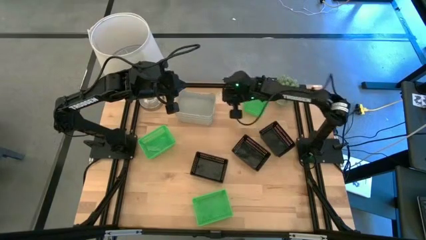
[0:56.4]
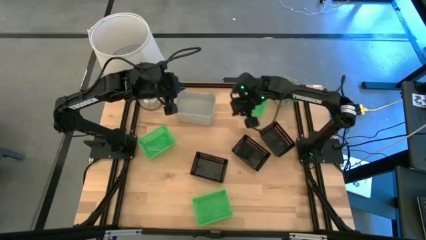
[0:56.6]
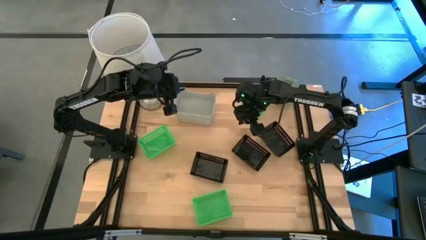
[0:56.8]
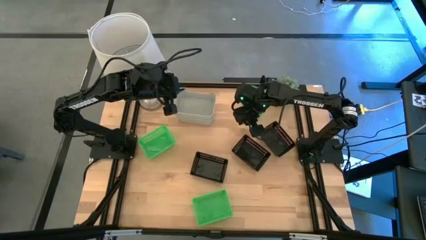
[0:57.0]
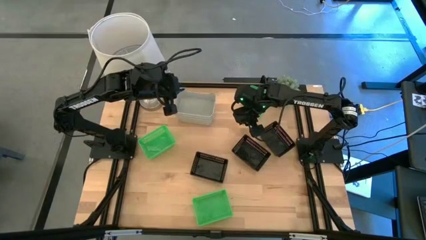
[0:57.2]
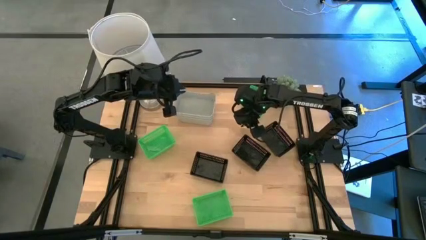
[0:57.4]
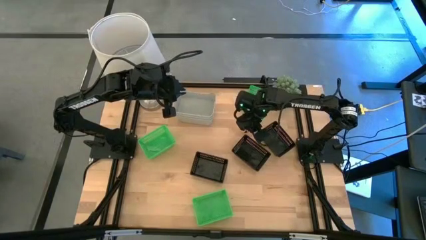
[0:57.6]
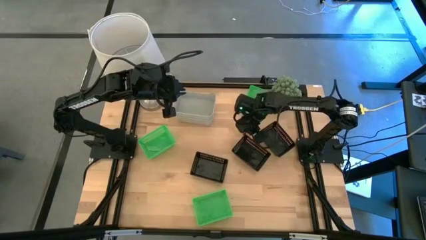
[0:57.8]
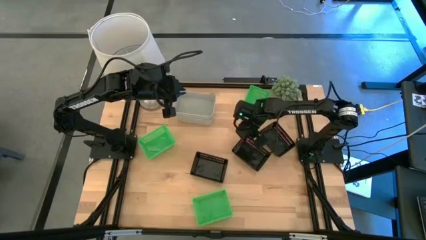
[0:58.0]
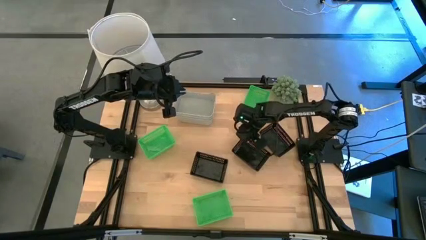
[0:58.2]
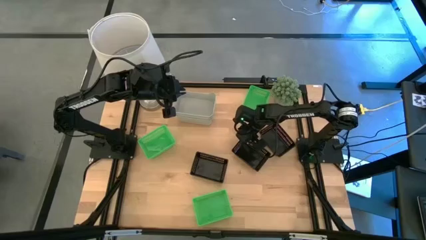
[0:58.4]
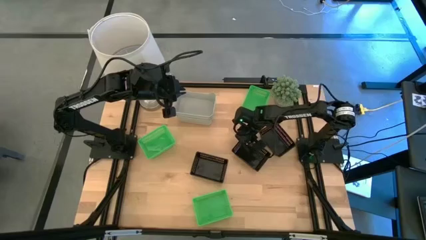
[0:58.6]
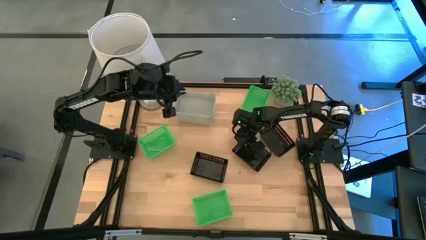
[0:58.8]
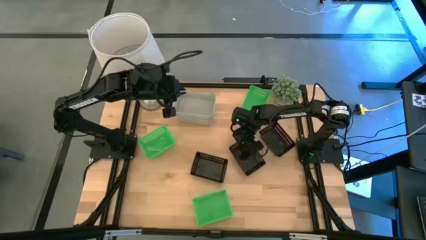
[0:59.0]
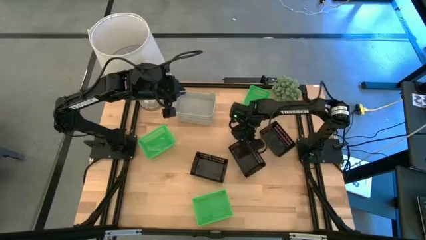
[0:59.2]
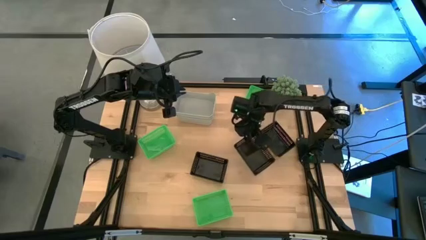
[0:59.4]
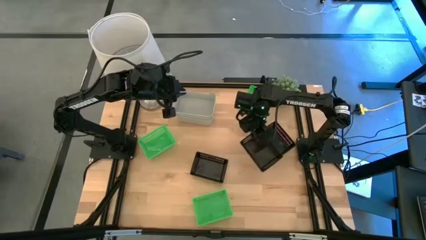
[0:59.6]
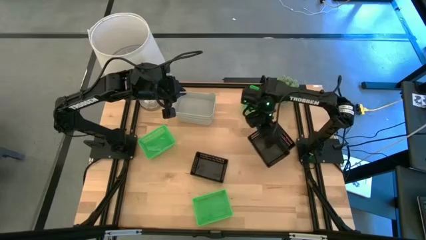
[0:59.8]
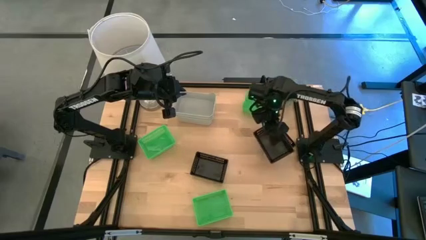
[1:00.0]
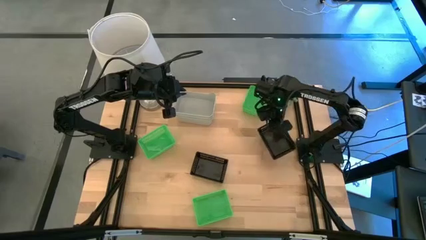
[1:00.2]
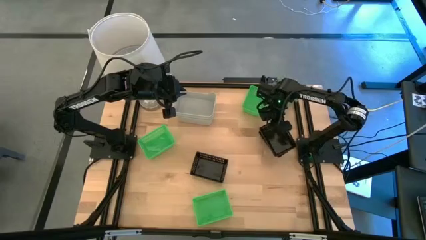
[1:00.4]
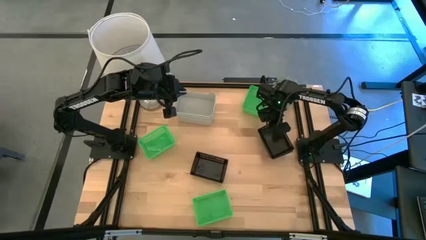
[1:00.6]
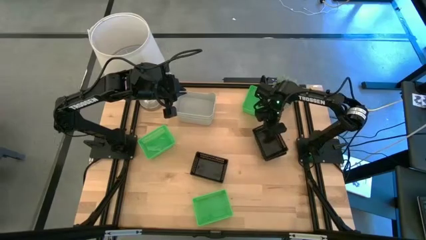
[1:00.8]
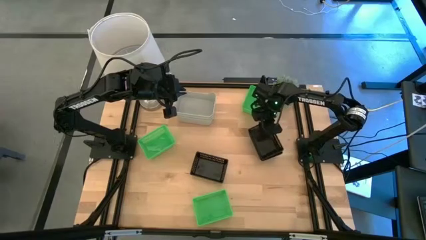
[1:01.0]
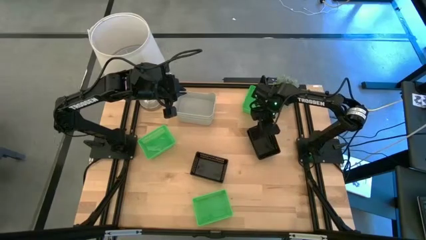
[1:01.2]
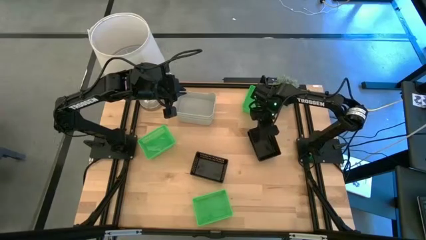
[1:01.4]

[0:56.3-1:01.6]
Stack the middle black bin on top of the top black bin

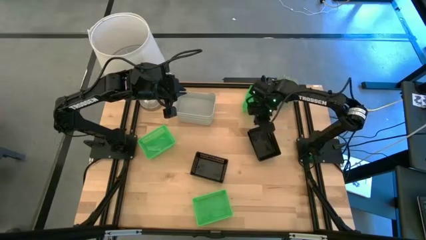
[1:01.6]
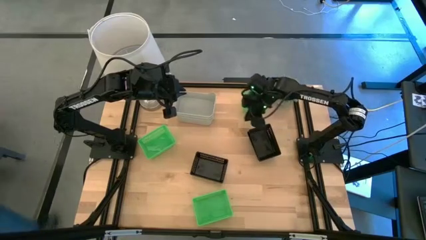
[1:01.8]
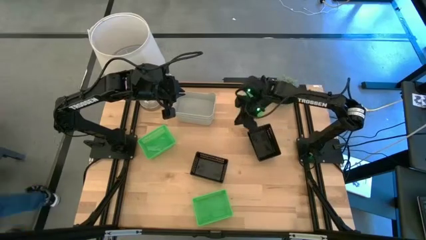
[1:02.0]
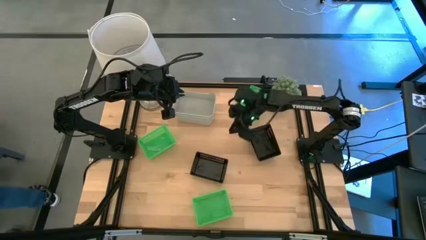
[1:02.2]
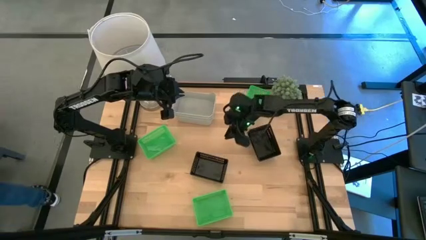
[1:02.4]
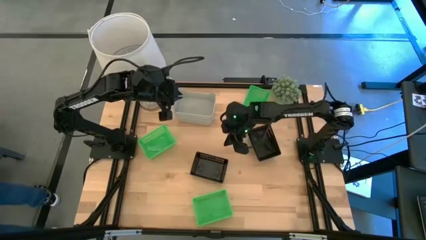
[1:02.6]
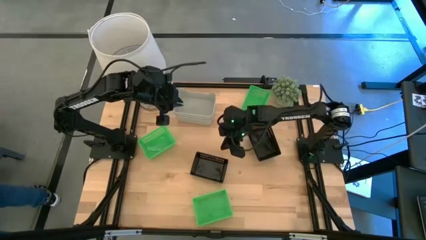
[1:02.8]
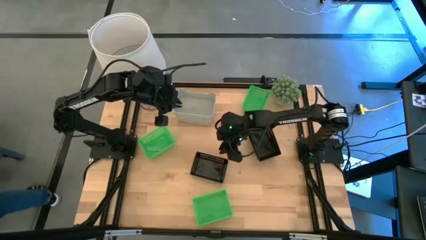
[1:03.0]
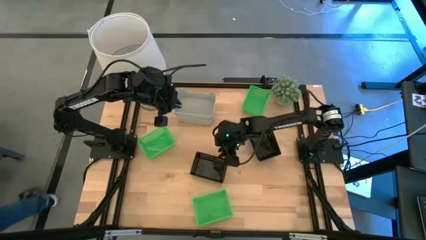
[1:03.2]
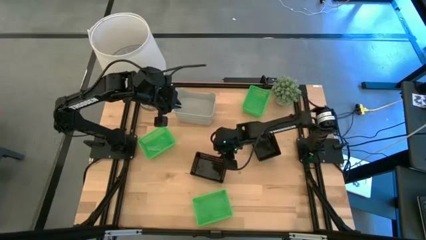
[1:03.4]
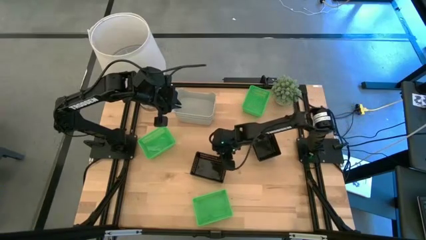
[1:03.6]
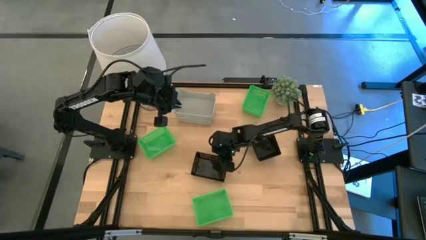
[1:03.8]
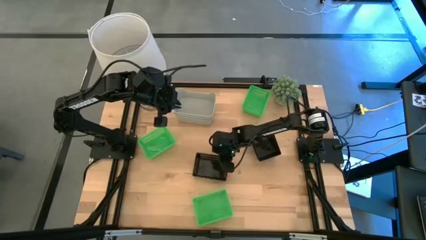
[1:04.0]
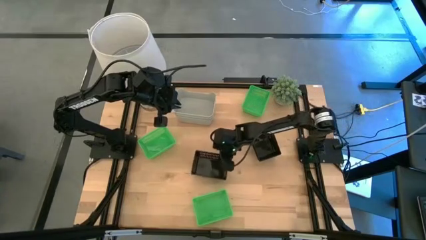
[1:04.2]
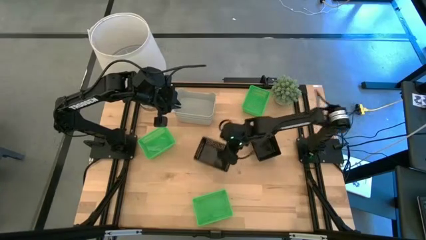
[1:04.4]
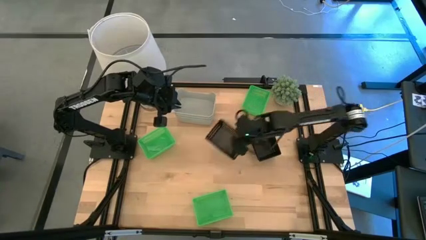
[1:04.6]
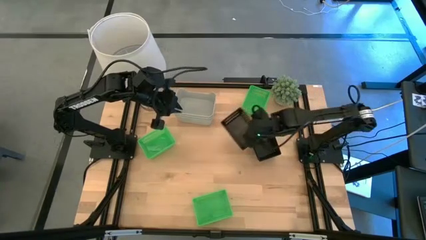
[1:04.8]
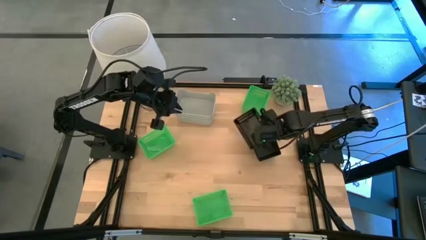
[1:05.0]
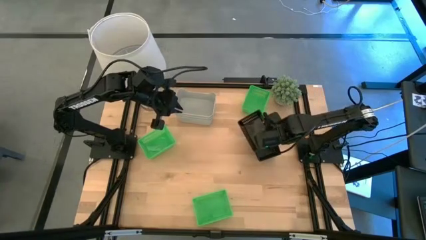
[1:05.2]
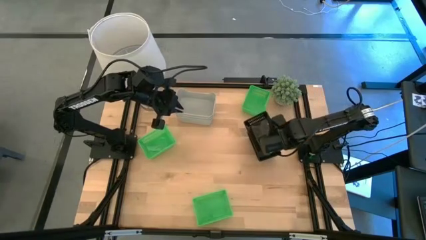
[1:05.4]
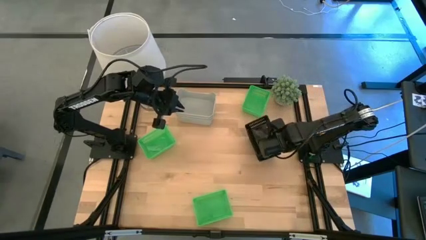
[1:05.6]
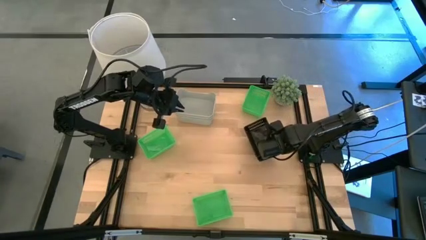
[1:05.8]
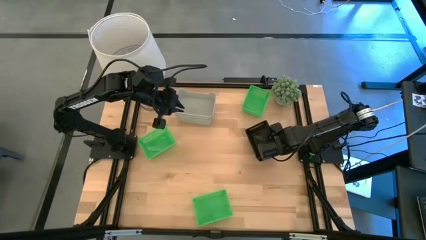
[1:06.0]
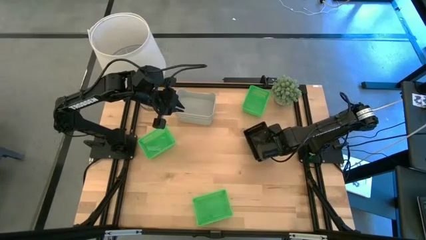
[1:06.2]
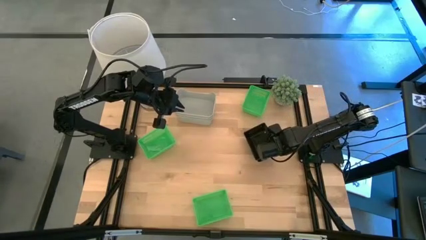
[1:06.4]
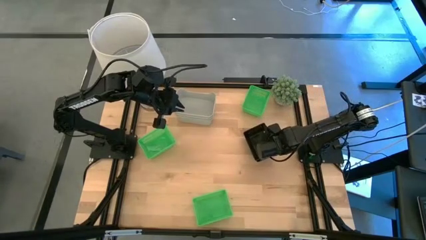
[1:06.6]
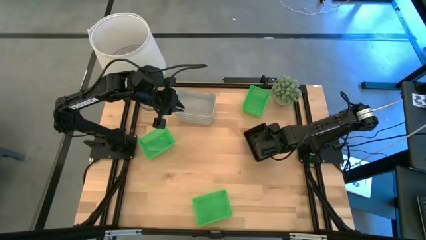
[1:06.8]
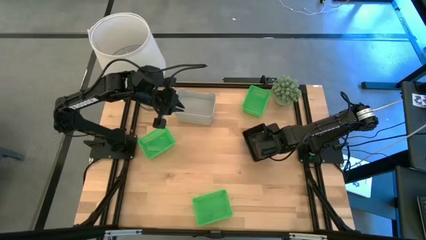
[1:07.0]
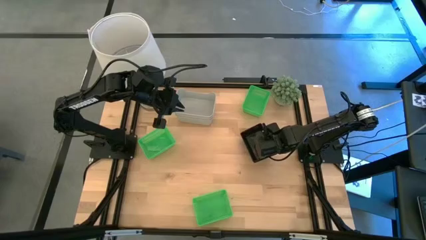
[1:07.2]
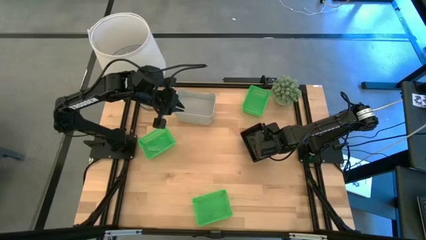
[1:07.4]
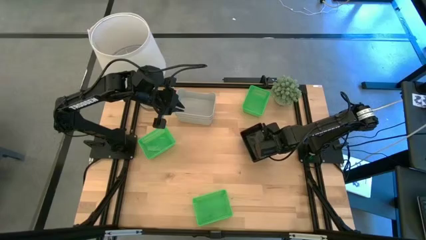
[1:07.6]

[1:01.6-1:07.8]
Stack the bottom black bin on top of the top black bin
